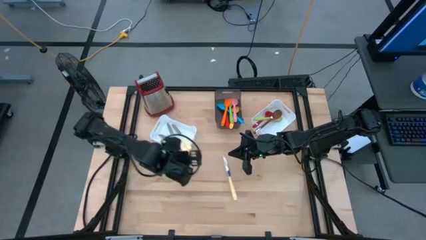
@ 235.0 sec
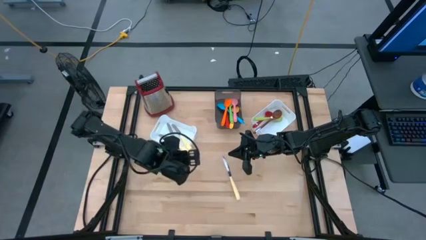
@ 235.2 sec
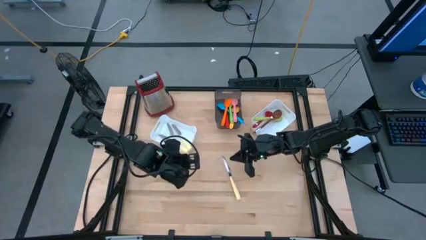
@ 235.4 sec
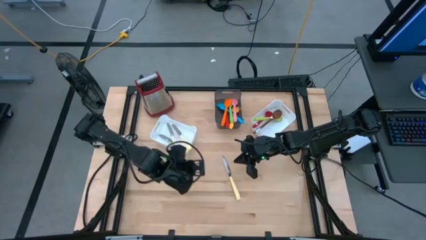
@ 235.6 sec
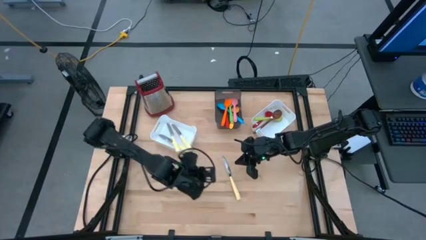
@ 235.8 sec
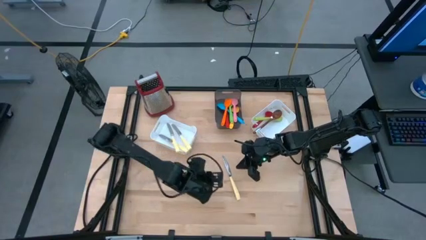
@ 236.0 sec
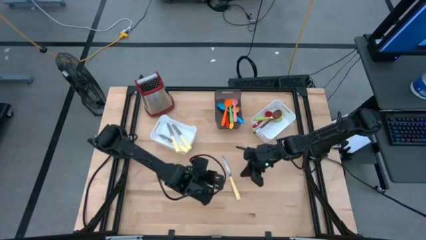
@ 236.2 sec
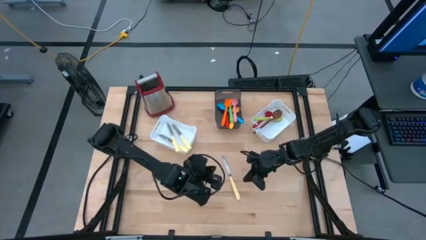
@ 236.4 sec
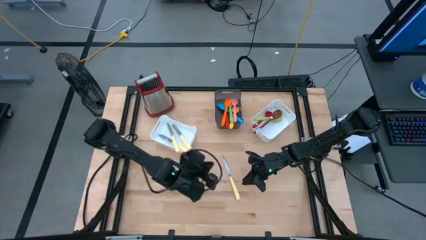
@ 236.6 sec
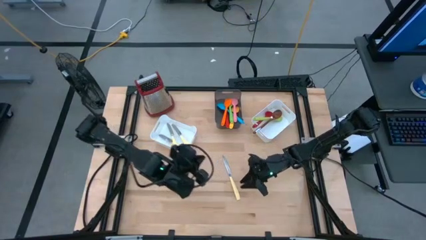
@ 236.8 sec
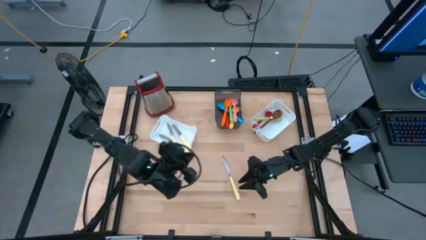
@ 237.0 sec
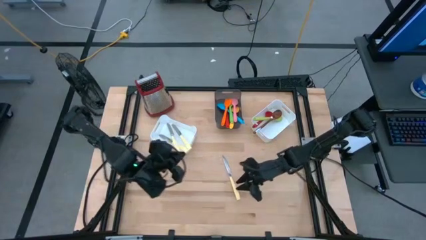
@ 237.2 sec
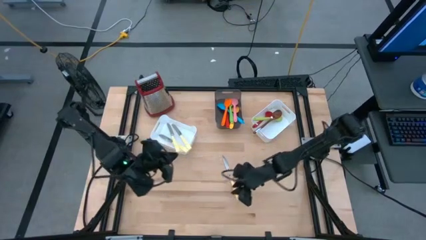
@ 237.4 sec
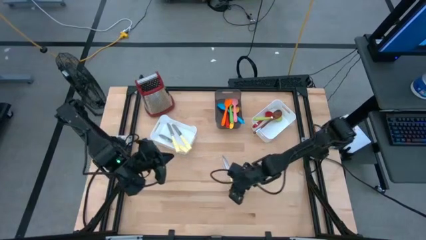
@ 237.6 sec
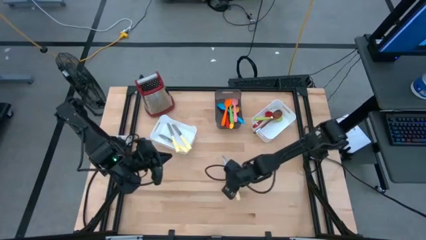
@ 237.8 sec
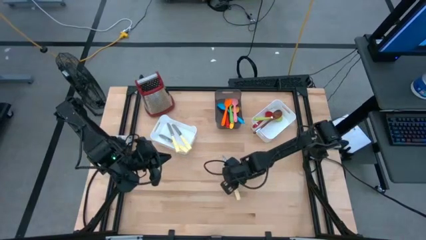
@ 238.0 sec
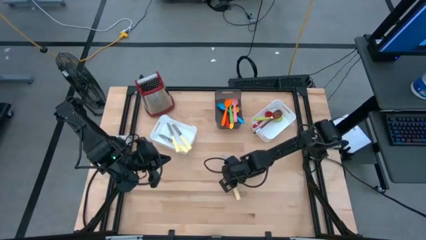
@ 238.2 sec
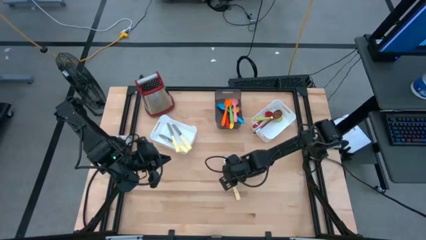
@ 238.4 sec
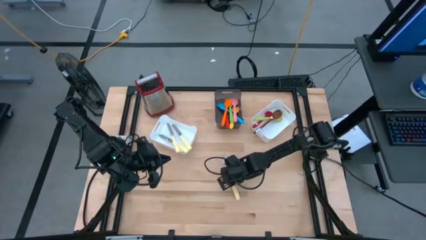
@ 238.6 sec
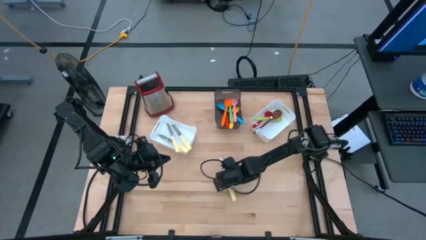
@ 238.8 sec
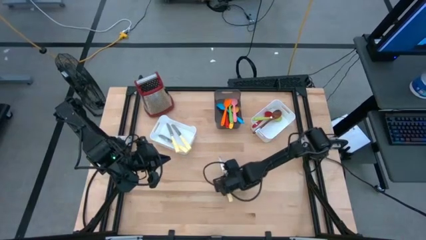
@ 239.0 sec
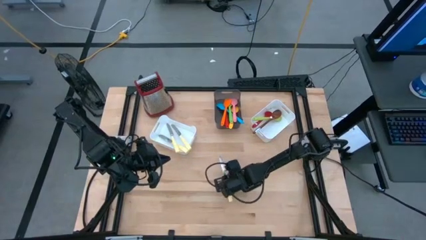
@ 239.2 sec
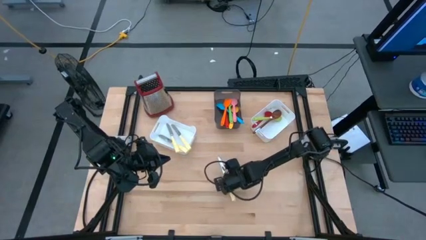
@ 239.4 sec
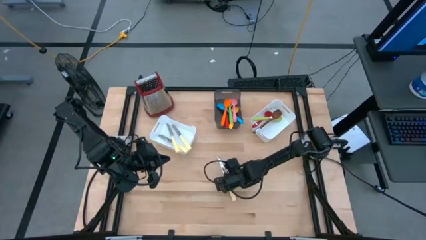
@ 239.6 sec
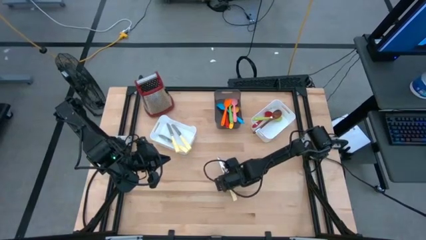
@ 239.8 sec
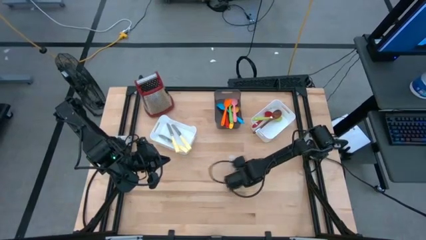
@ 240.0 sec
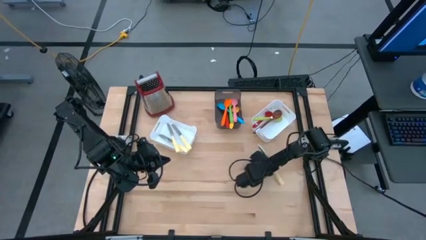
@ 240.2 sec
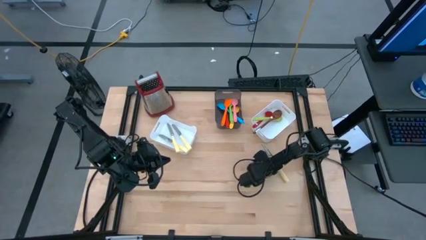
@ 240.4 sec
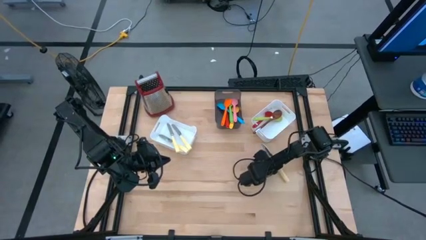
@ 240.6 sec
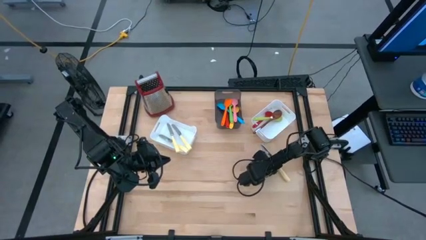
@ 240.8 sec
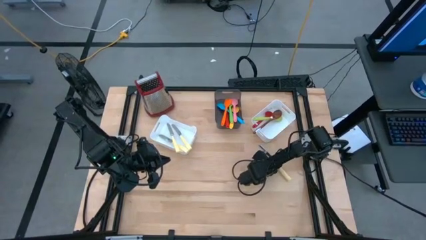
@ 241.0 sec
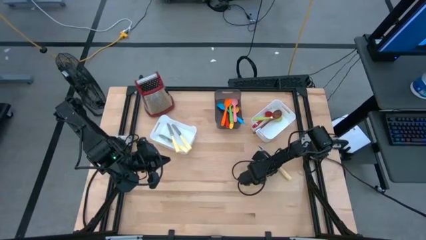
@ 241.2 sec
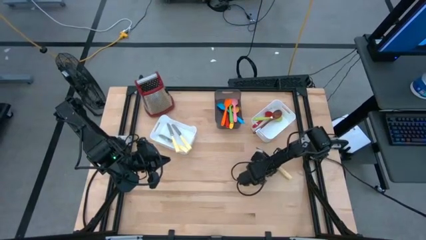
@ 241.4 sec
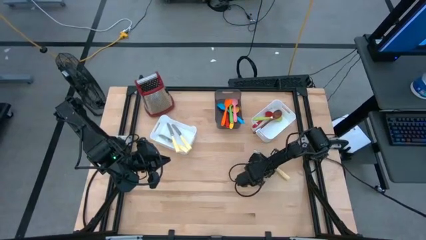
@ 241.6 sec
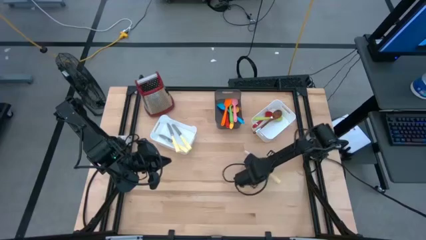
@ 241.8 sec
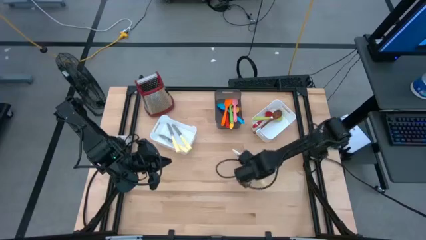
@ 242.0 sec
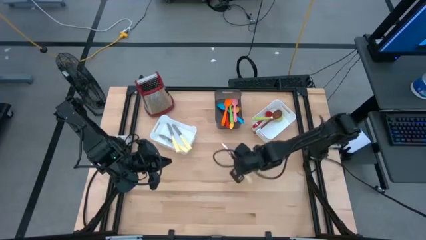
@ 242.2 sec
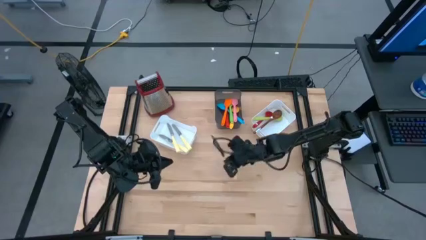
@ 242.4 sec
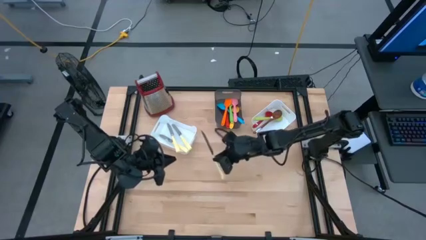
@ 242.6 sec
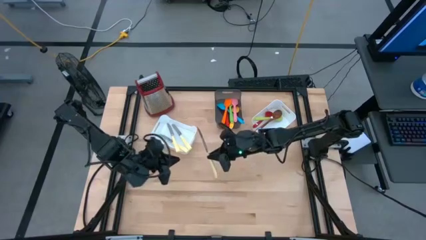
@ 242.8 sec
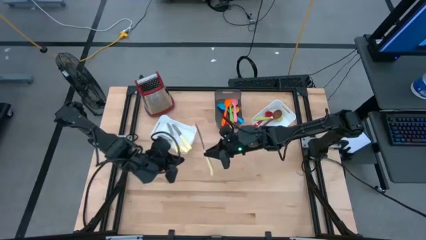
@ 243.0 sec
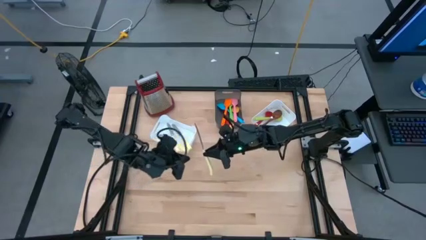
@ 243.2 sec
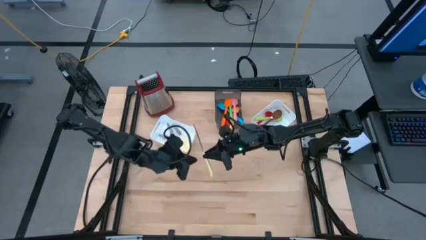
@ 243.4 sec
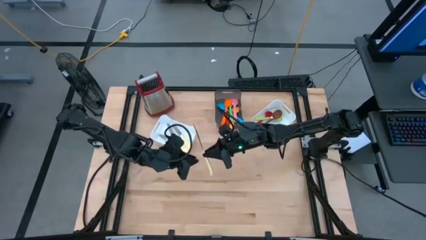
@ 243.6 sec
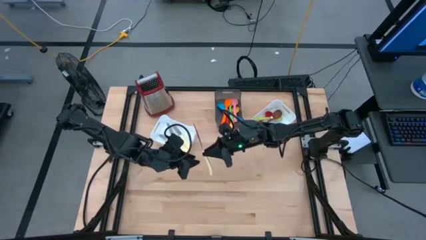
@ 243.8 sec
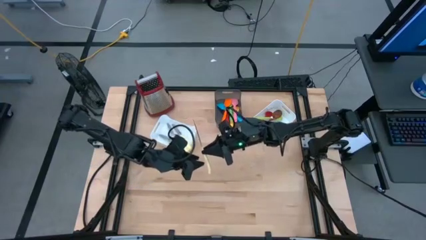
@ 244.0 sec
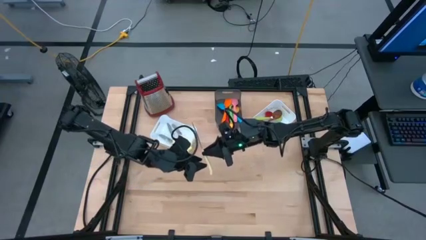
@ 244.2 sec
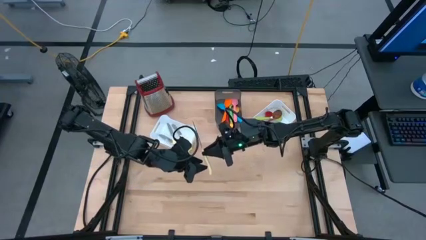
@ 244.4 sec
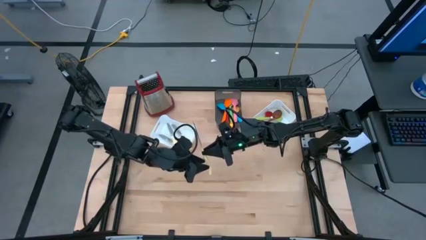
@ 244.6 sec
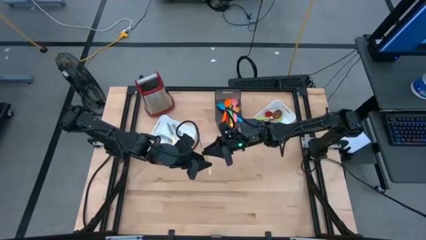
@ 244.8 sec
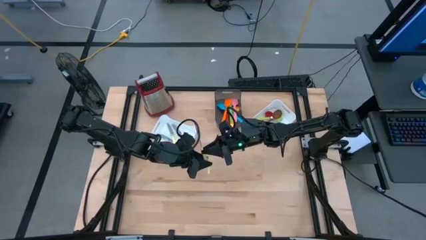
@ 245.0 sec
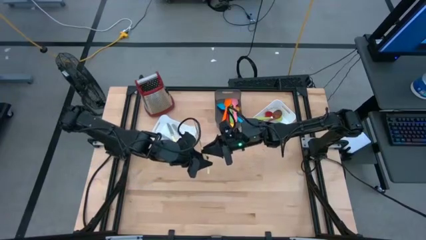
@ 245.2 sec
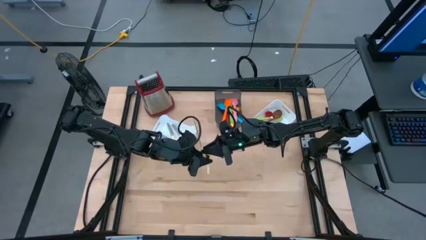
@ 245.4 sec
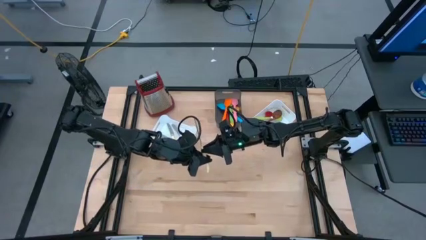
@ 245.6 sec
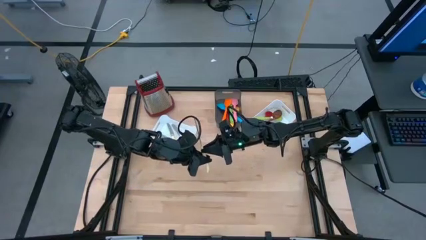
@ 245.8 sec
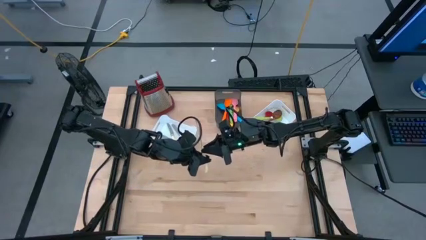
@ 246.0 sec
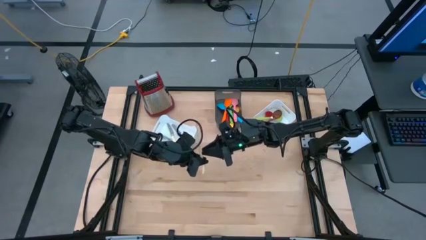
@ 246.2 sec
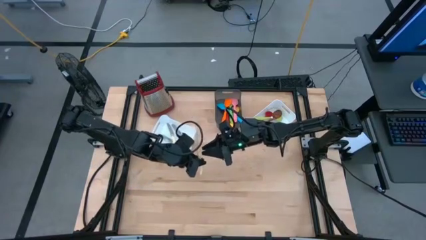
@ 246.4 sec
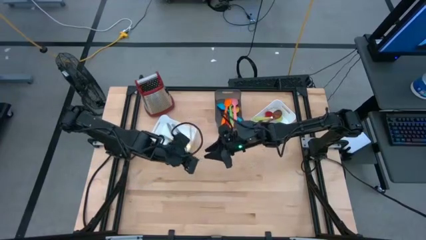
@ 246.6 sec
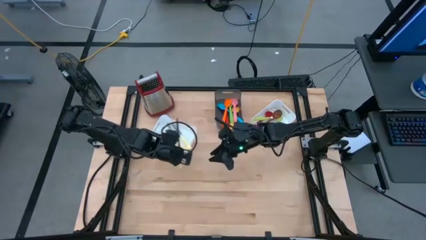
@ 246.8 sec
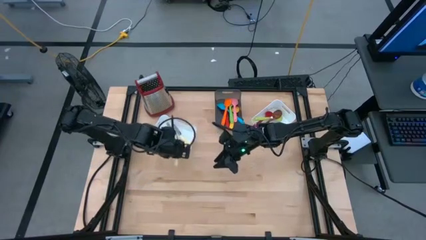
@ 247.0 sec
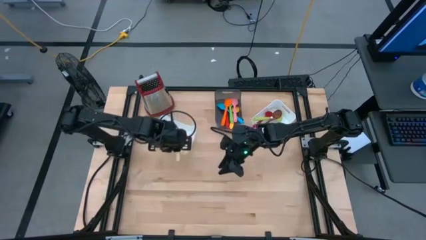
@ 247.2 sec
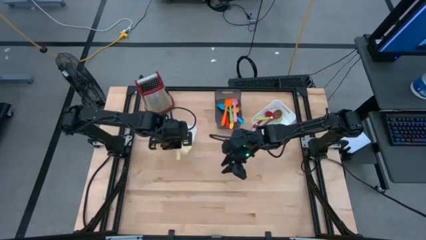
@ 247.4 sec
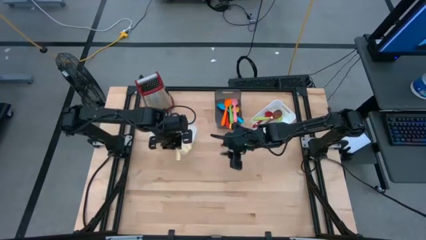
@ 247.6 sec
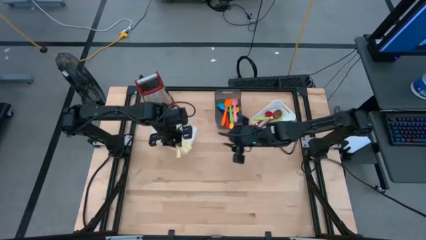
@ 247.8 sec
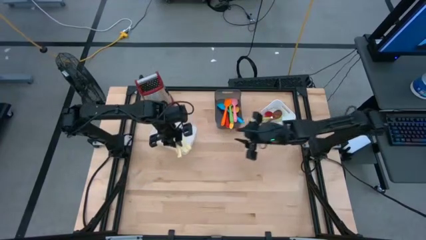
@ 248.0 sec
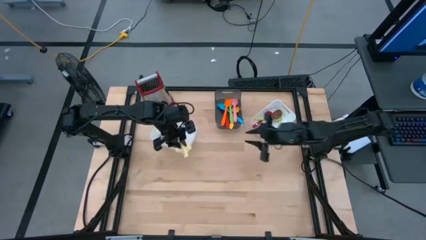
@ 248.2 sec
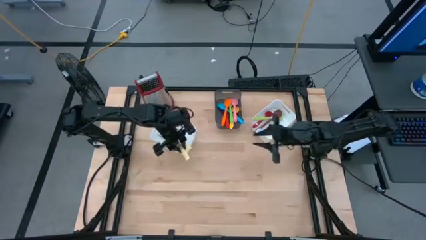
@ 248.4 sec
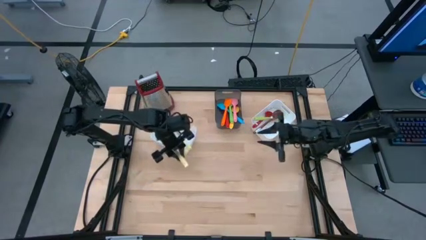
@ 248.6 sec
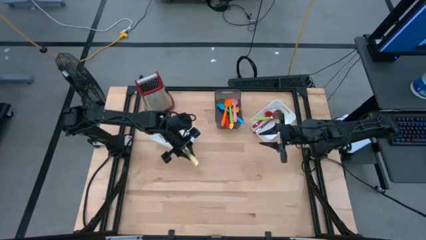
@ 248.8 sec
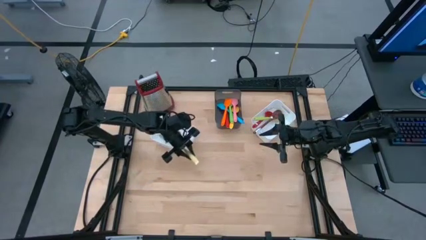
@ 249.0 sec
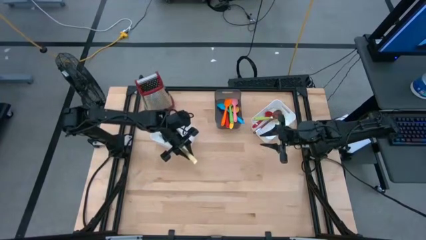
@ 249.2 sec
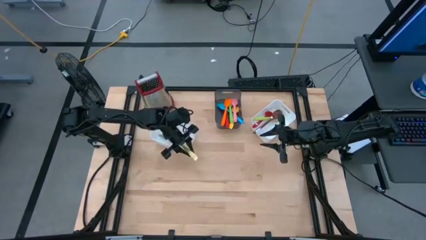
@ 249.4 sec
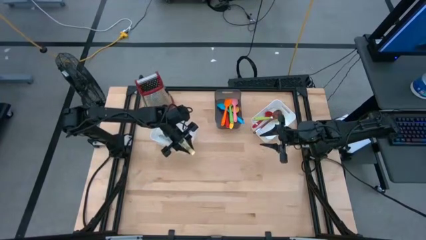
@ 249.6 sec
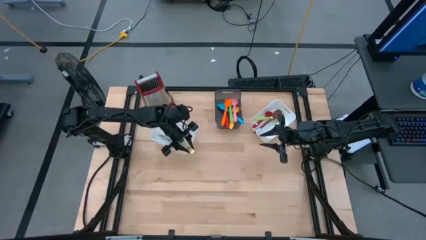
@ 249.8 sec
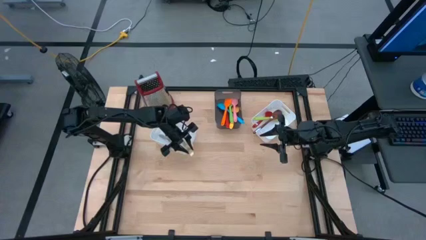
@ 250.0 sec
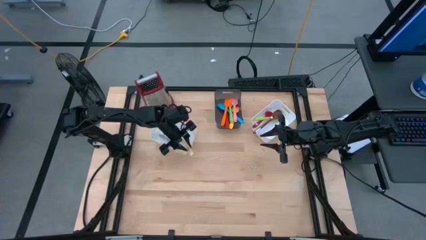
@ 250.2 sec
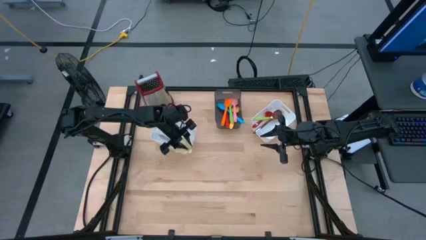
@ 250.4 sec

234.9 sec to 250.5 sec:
Task: Pick & Place Kitchen Items
Put the yellow knife into the left white bin
